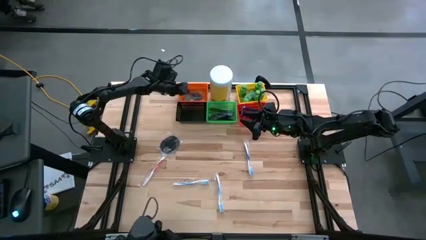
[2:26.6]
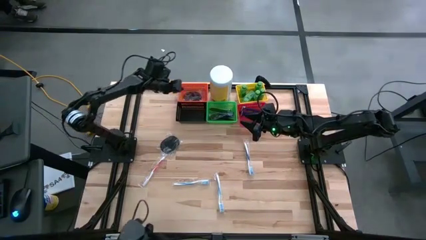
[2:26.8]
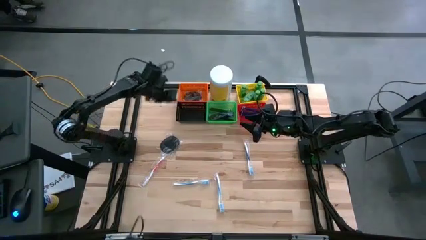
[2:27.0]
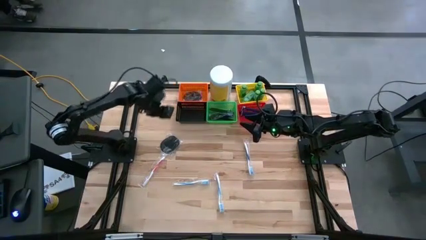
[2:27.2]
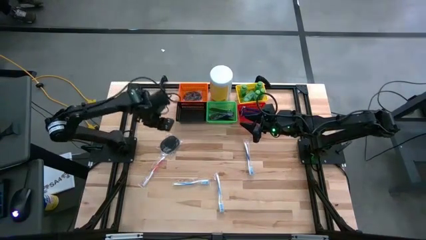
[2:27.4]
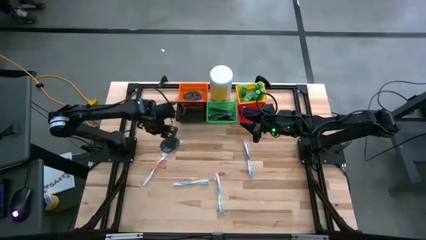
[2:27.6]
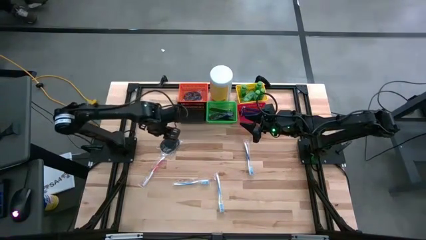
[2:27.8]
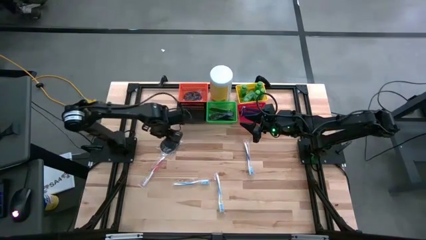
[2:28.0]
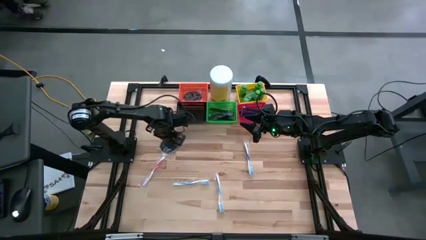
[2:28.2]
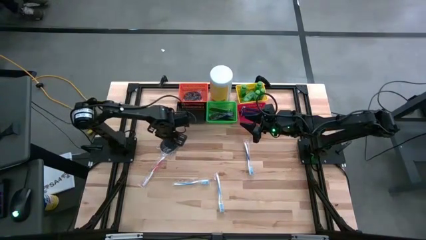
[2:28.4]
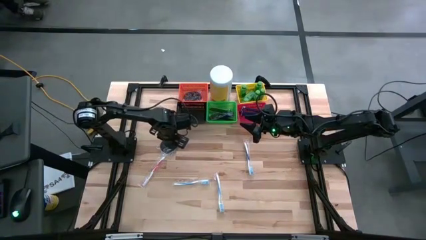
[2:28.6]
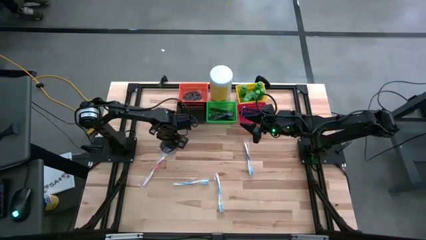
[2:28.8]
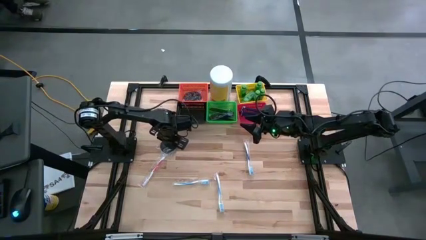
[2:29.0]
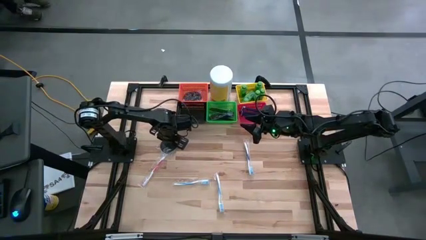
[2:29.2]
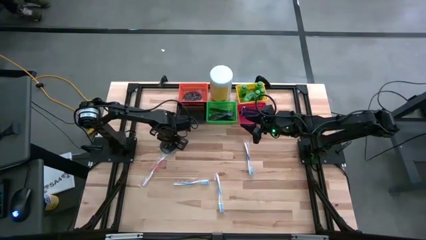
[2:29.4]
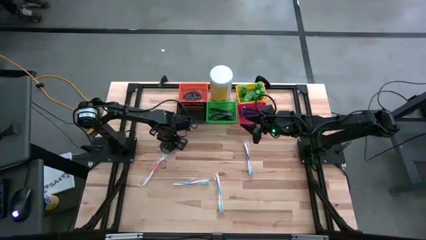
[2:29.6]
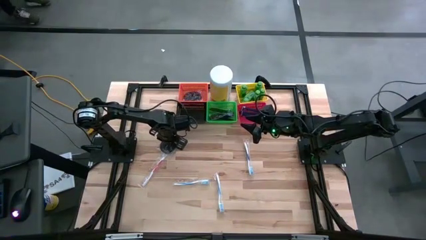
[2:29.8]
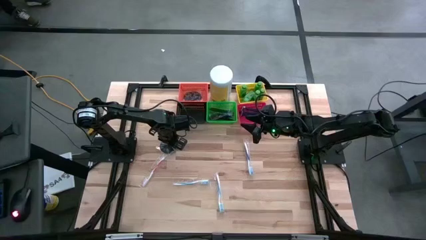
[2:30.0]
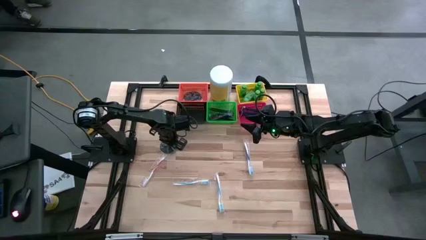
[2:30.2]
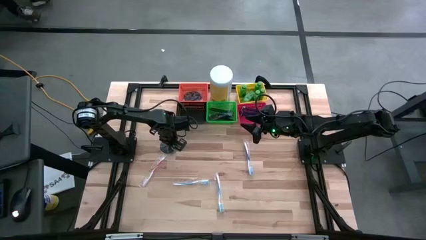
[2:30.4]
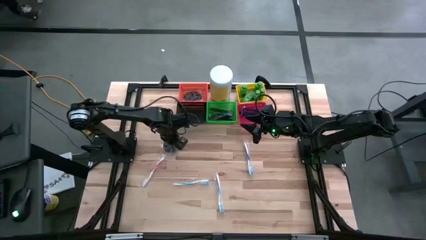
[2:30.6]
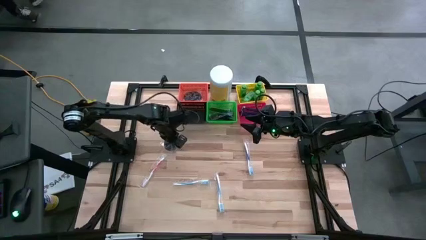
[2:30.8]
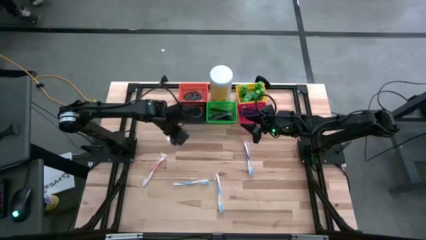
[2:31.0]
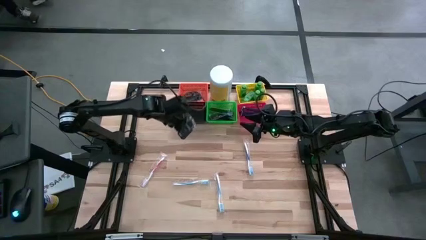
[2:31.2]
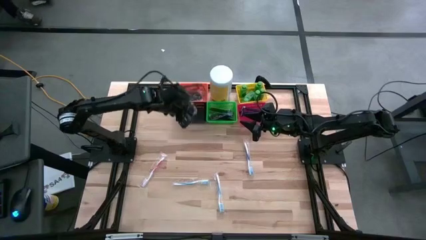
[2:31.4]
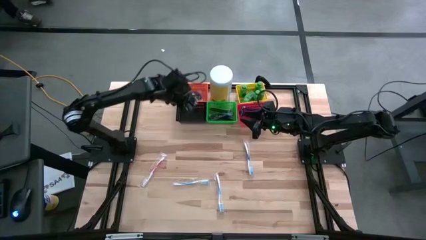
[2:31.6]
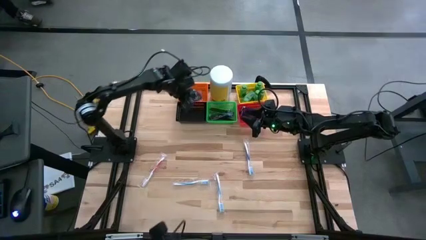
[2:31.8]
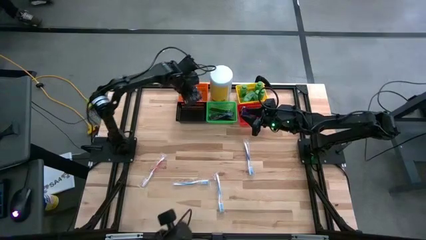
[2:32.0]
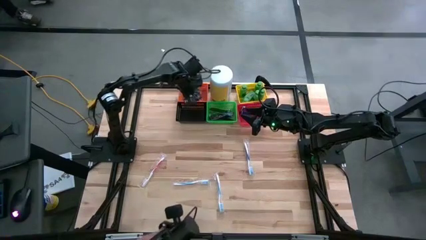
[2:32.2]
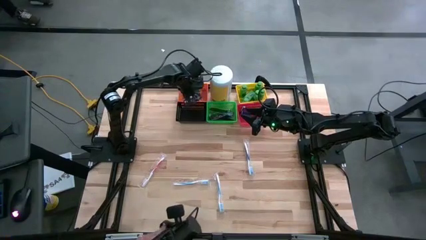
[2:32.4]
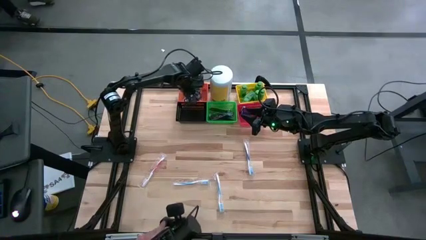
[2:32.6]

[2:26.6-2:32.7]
Task: Pick & Place Travel size toiletries
Put the black hairbrush into the orange bin

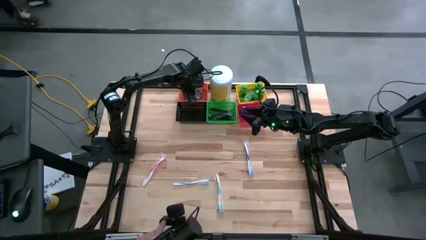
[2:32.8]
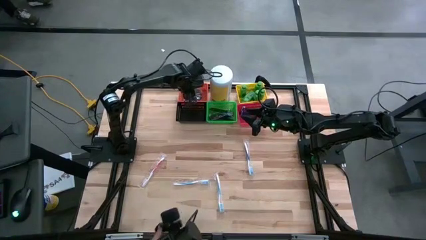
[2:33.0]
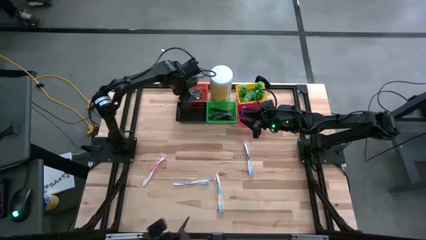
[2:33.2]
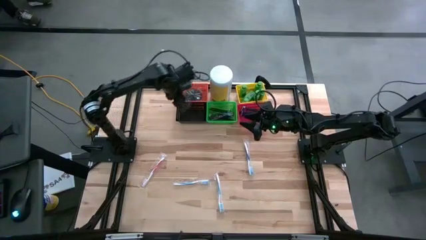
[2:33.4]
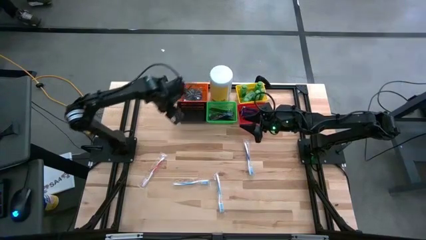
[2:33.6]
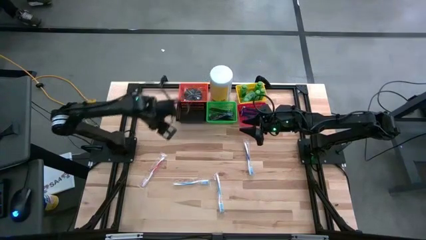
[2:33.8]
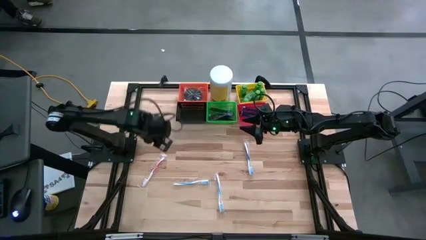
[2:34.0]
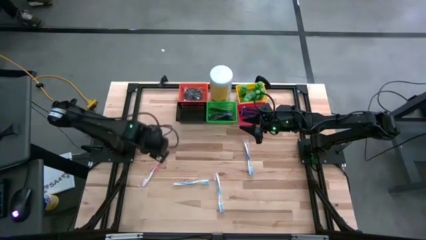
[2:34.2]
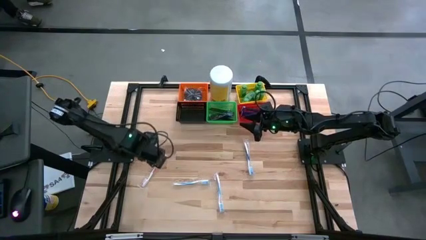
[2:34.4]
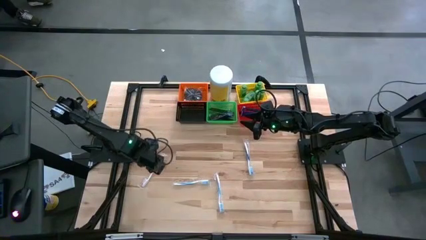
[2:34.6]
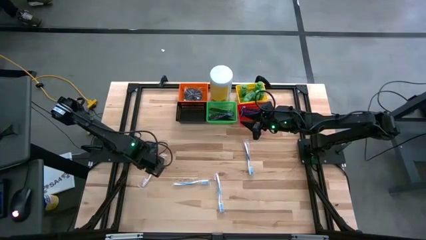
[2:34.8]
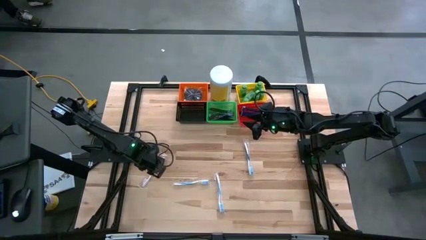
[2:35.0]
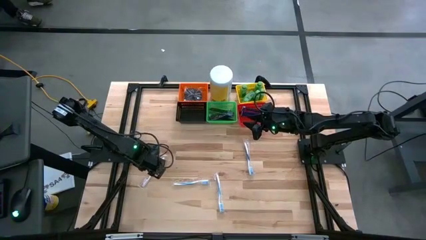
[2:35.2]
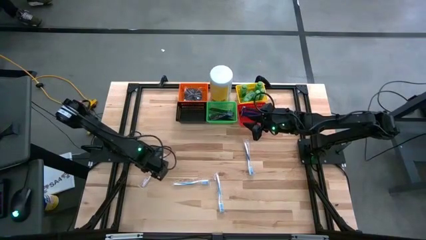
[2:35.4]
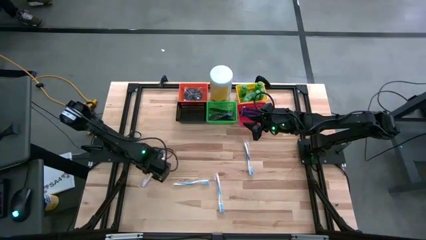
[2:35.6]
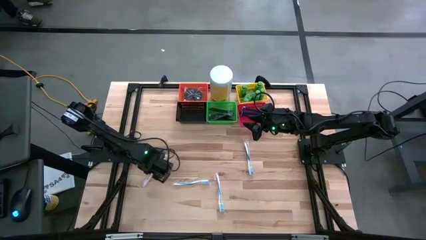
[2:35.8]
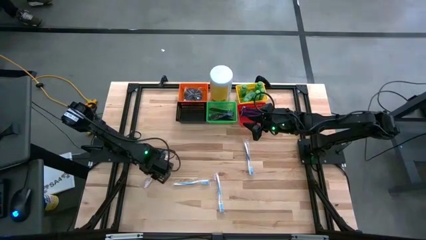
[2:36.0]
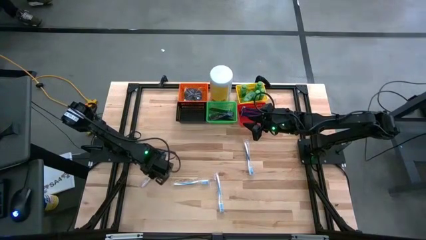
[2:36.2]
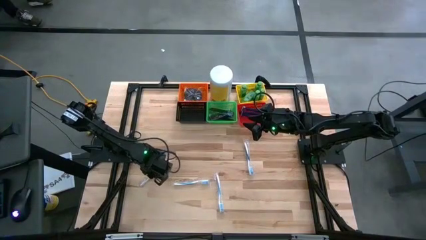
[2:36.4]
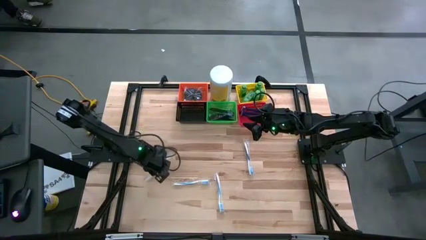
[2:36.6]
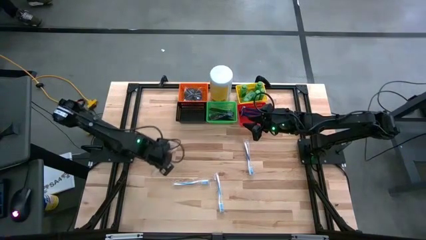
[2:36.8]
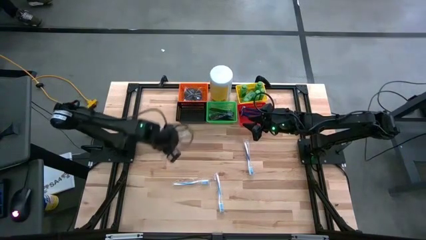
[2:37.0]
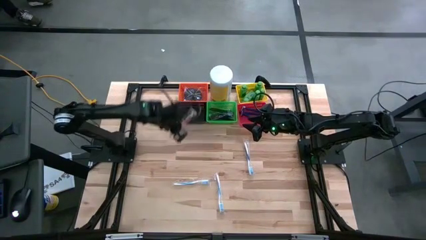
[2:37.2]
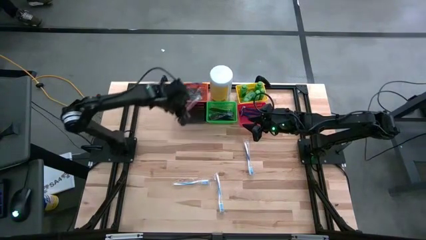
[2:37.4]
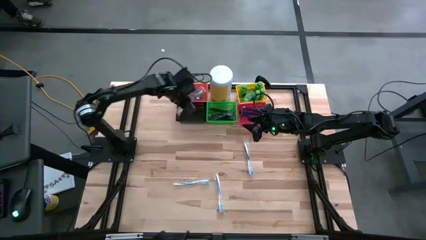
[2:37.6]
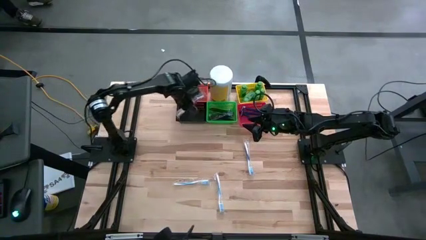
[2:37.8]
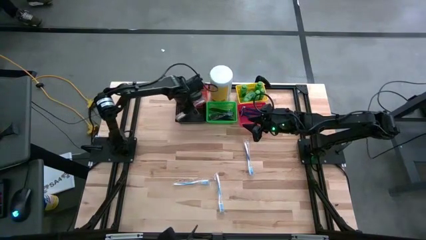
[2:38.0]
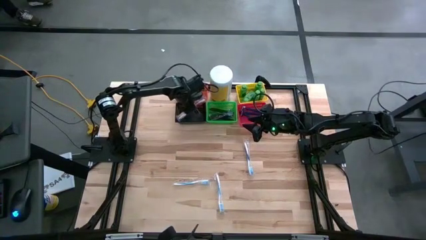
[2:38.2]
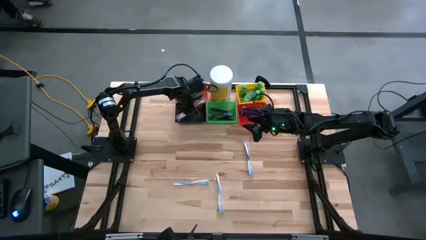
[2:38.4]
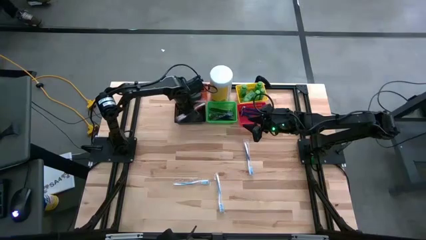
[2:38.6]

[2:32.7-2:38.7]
Put the red toothbrush into the black bin
